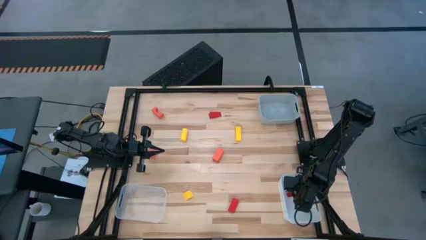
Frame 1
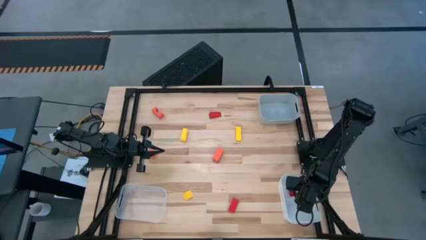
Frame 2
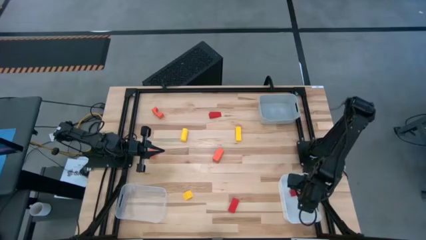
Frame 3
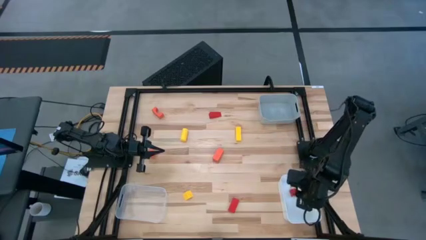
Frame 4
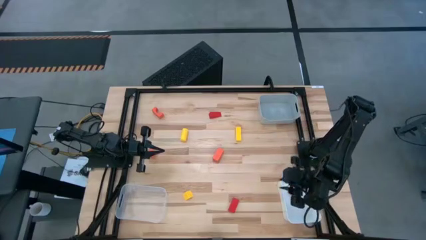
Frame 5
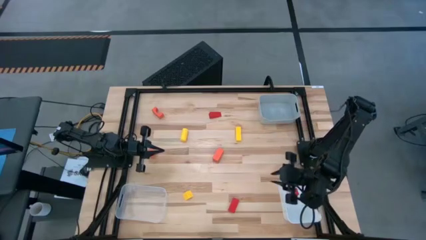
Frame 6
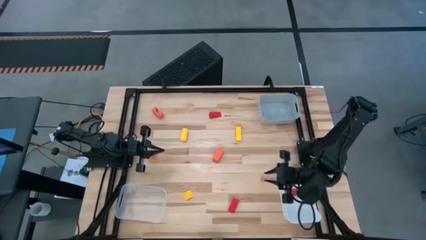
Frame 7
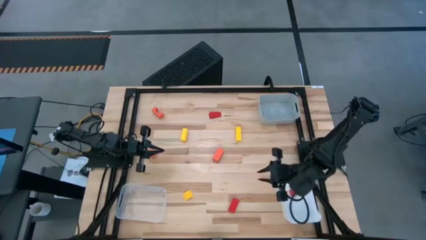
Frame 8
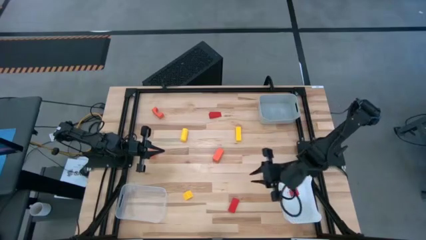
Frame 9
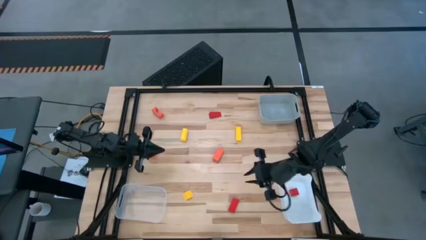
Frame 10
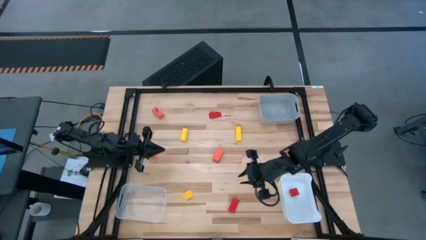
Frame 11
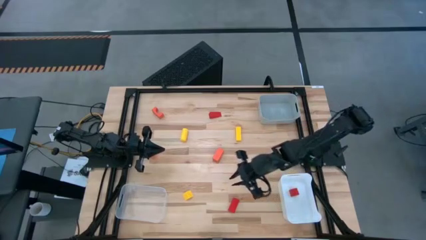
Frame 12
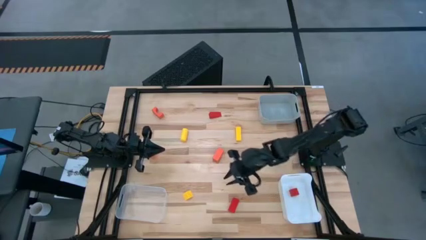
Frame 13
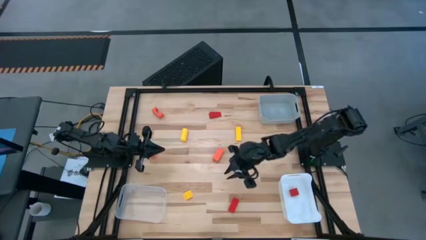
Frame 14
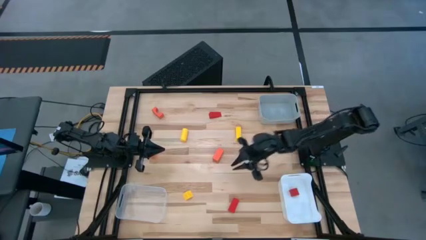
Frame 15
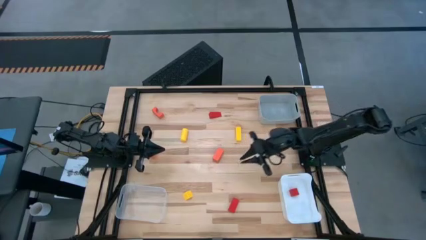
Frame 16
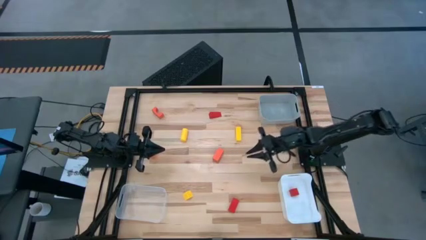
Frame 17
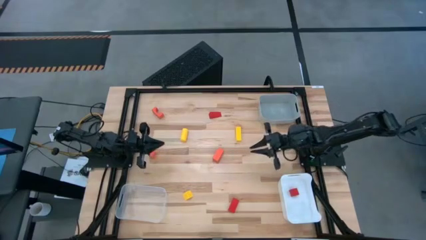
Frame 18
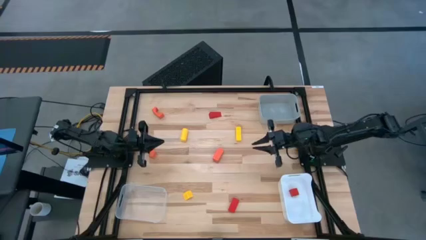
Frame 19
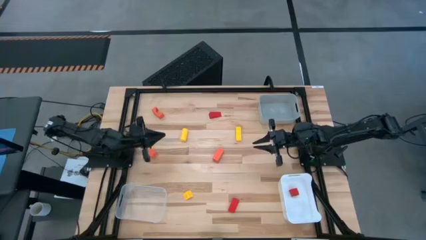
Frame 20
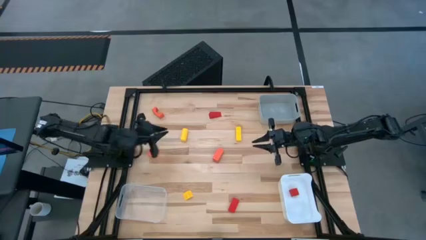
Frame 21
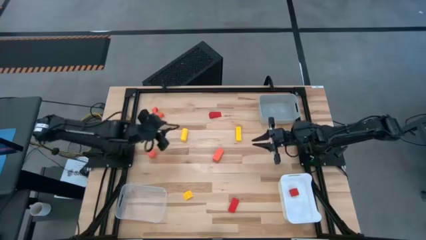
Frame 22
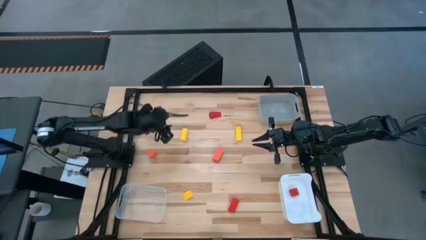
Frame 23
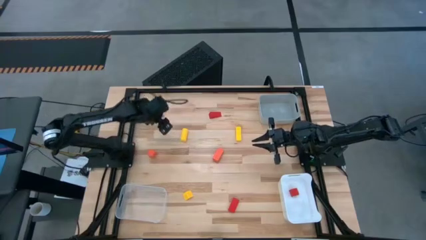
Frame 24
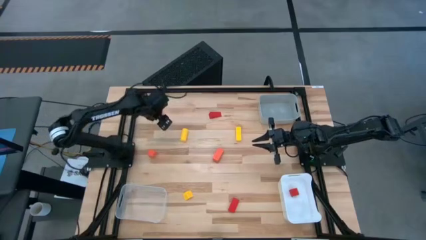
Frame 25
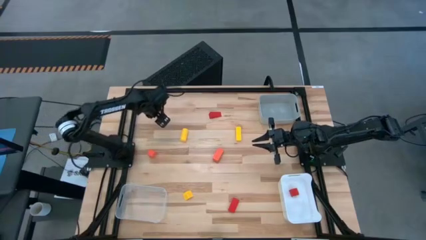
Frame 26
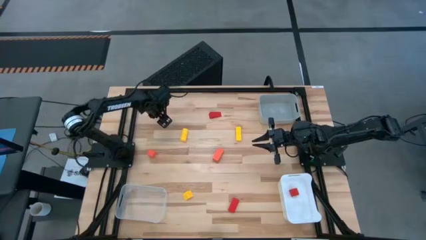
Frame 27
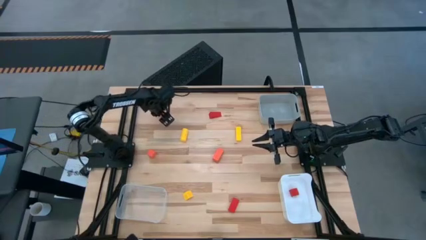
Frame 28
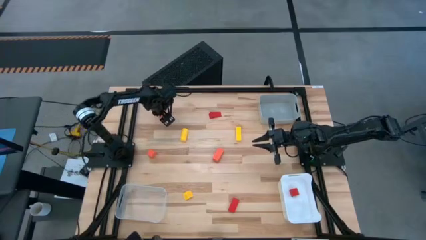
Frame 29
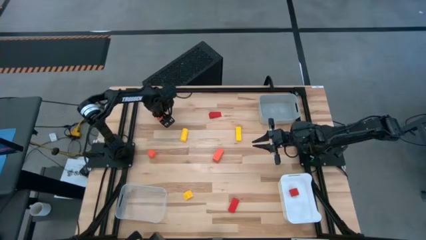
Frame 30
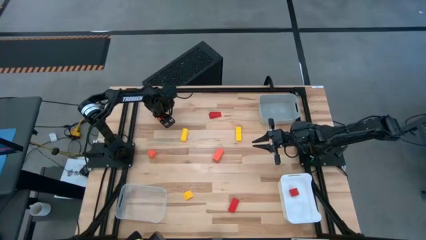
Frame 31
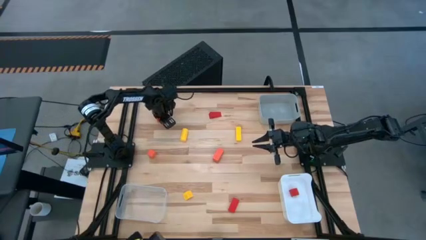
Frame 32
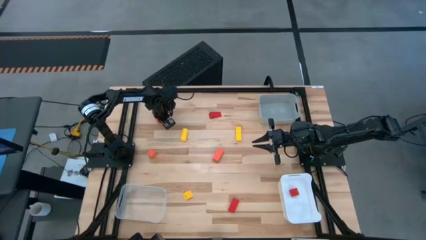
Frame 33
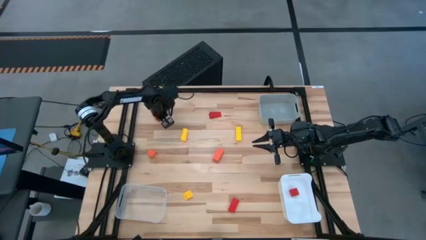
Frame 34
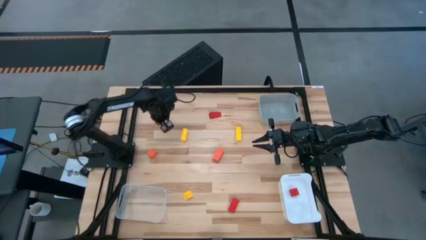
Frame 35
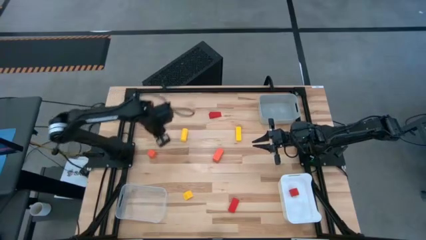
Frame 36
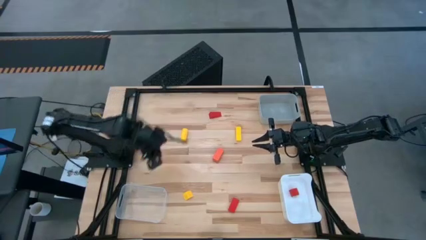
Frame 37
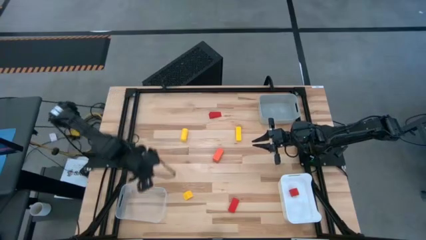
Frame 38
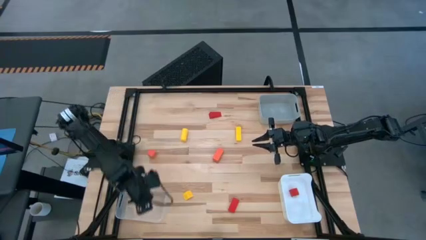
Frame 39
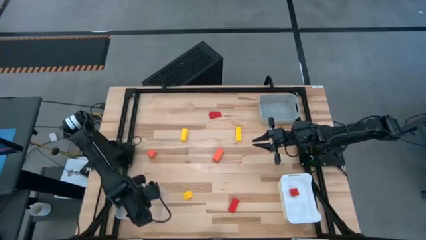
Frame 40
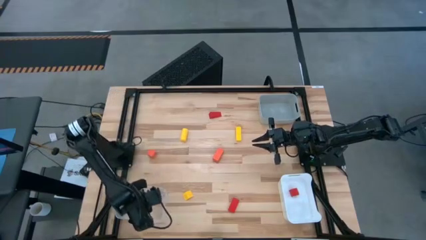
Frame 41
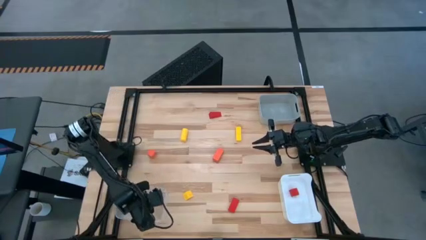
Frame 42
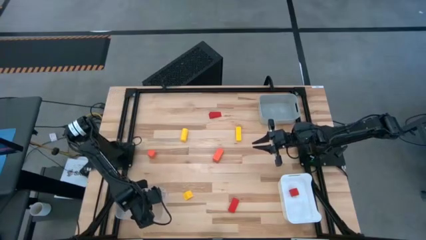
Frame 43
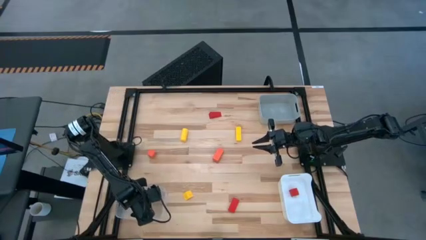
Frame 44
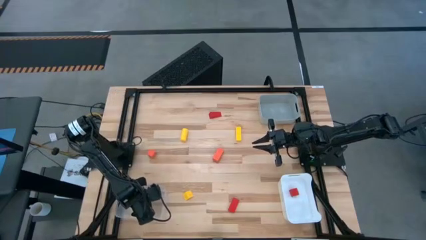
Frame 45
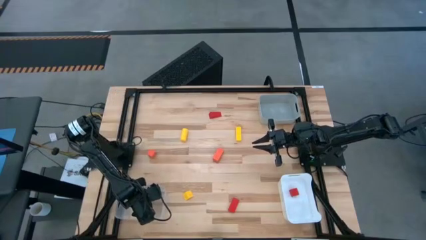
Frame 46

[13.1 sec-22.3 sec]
Task: Sort & place blocks by color
Put the top orange block into the transparent bin

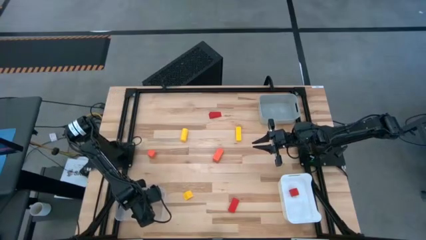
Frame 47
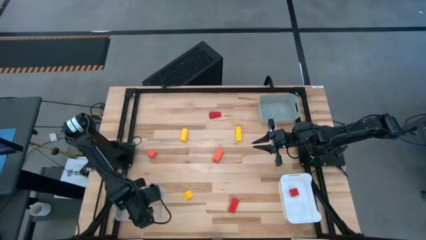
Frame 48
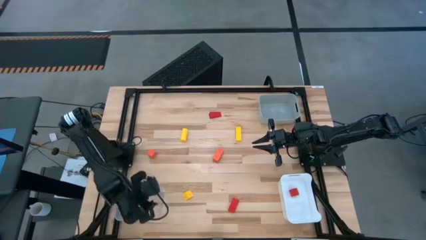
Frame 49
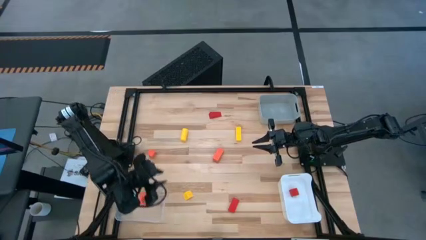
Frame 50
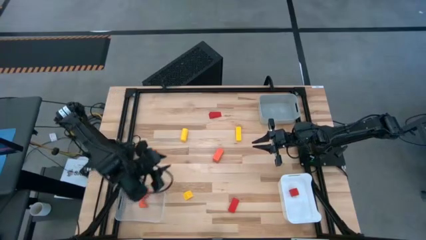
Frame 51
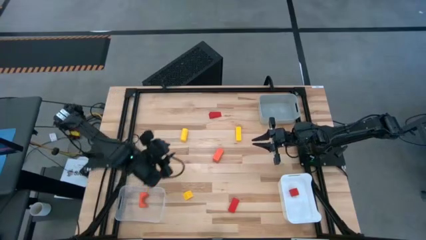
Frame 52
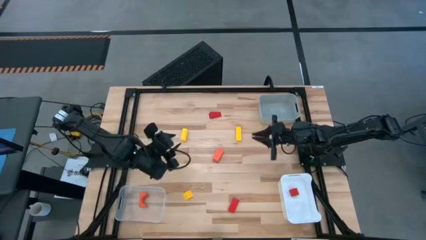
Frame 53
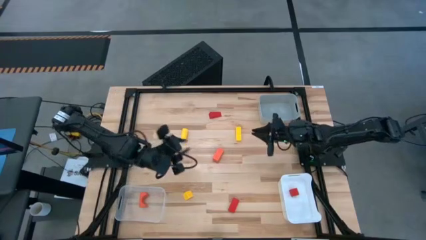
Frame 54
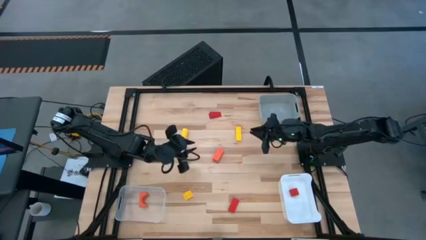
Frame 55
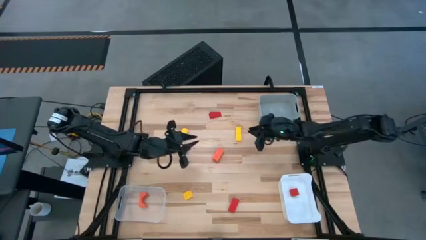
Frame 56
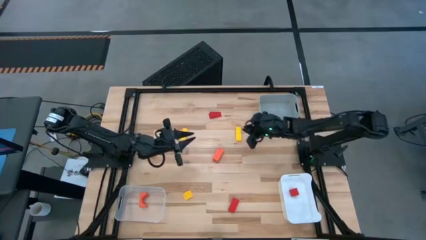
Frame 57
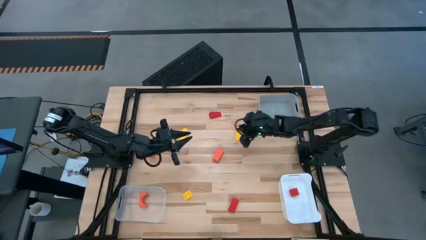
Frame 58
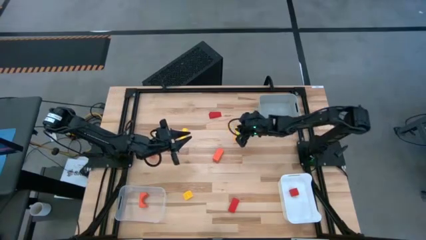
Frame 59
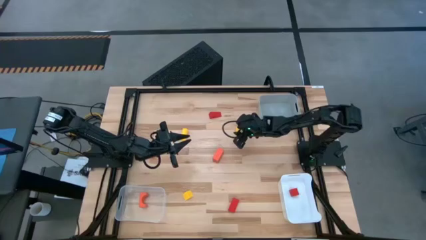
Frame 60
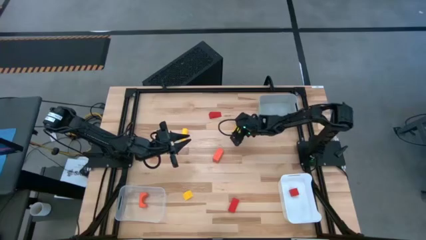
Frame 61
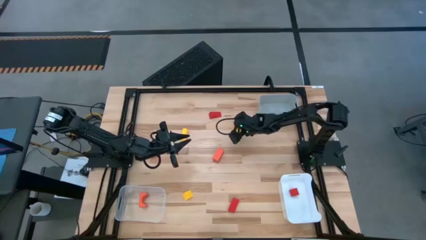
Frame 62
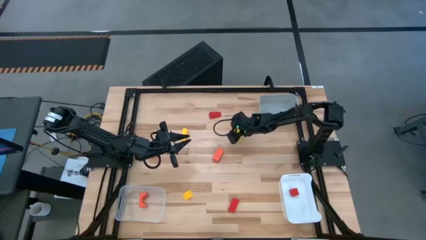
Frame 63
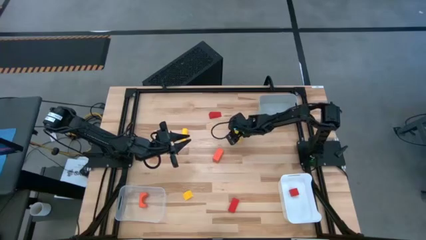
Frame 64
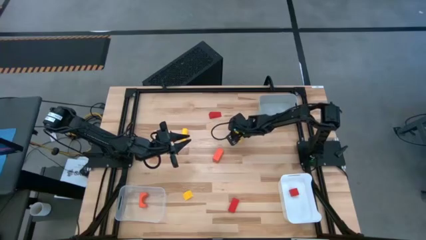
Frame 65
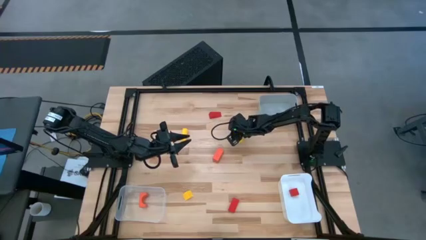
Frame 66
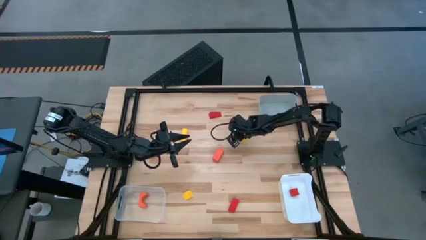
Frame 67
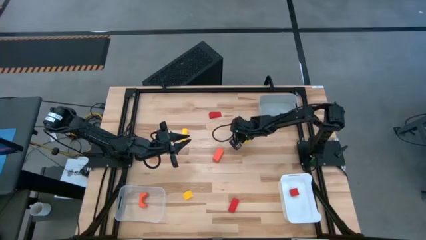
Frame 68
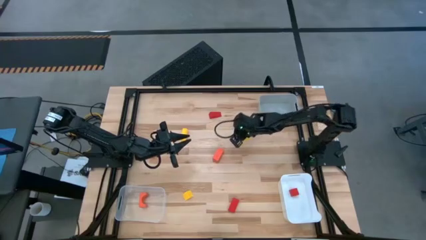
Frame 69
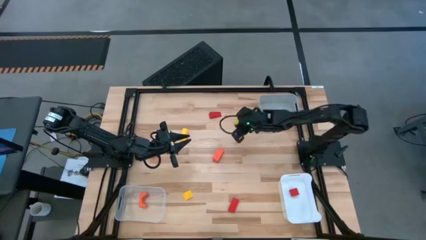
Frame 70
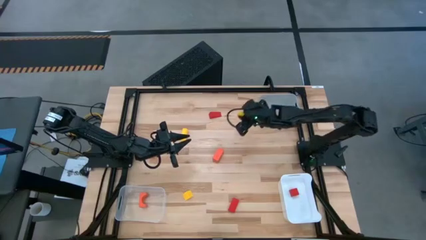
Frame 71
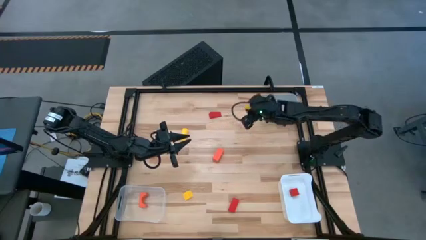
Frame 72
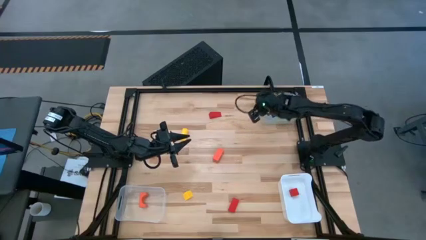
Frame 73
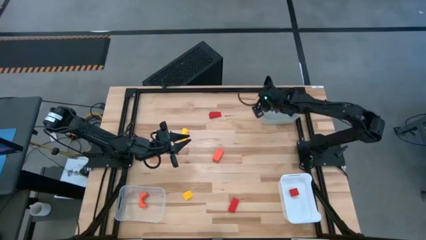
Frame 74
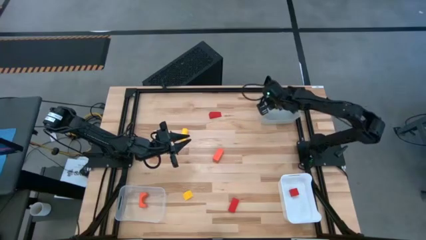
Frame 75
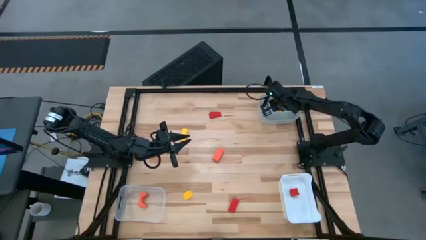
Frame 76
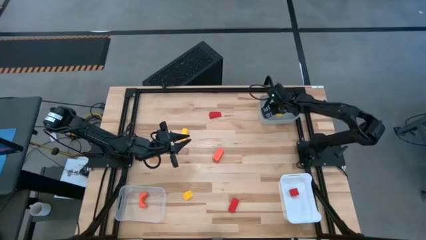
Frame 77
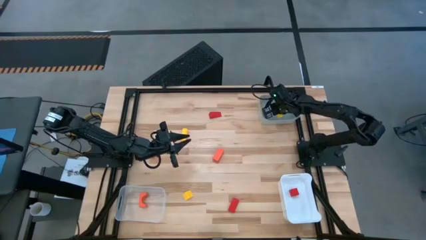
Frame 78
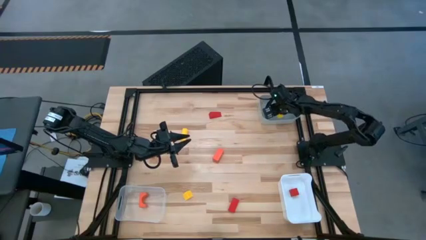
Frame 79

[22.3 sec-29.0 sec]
Put the top right yellow block into the gray bin
